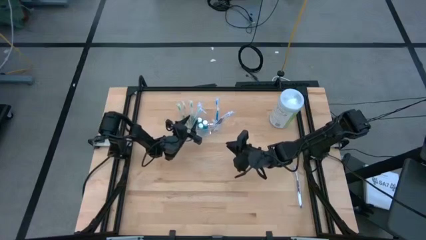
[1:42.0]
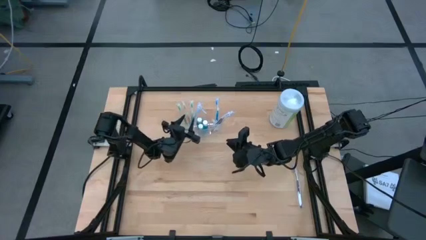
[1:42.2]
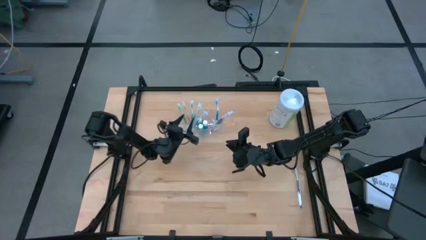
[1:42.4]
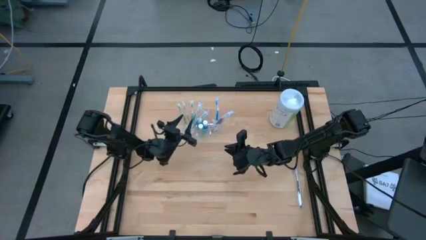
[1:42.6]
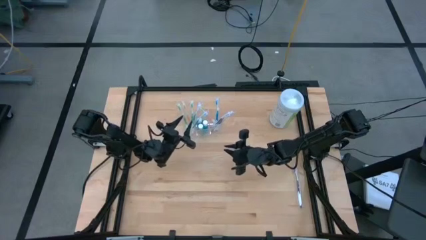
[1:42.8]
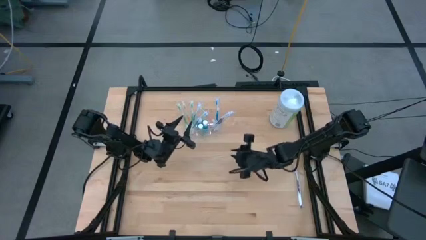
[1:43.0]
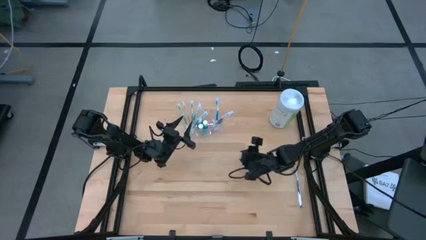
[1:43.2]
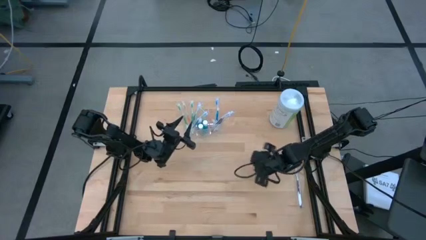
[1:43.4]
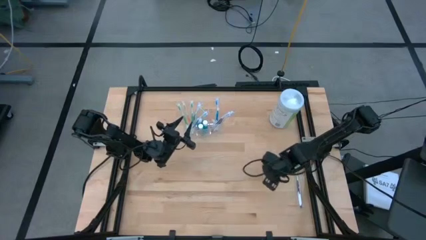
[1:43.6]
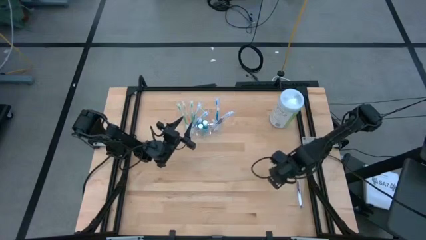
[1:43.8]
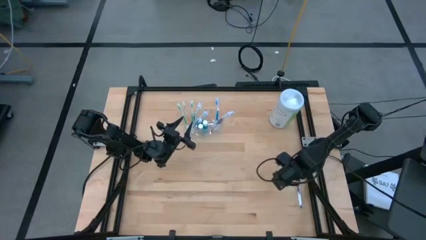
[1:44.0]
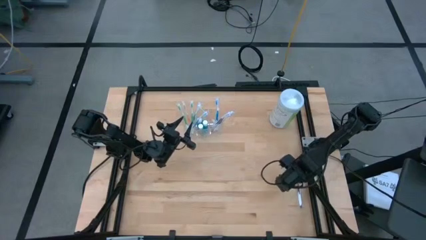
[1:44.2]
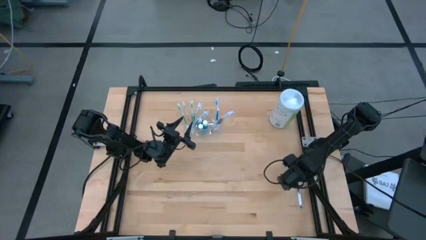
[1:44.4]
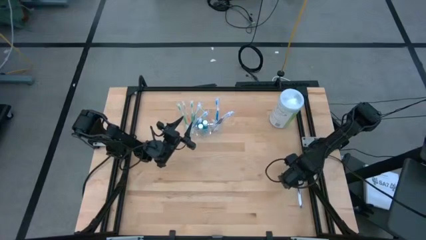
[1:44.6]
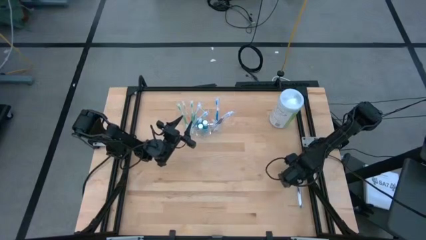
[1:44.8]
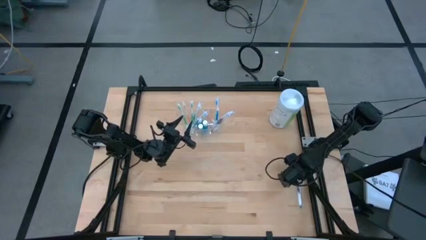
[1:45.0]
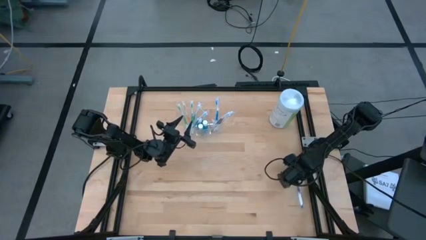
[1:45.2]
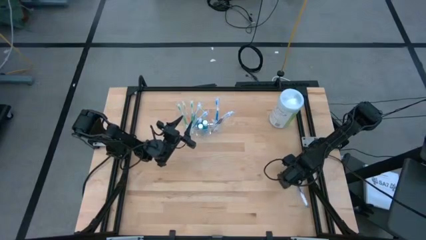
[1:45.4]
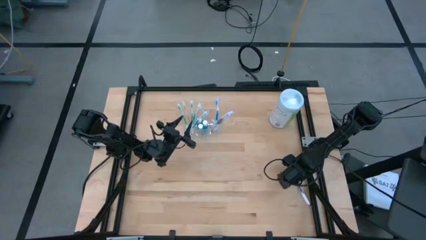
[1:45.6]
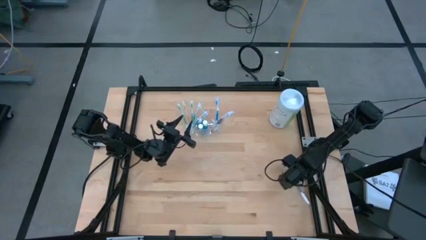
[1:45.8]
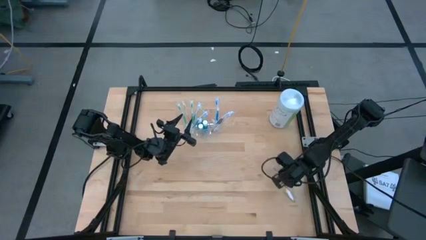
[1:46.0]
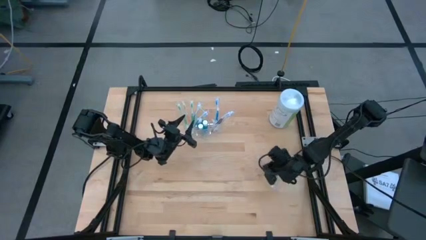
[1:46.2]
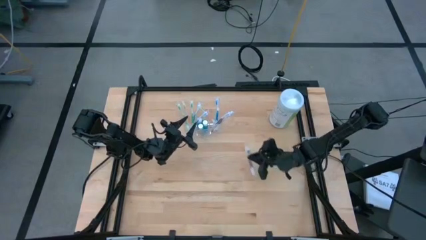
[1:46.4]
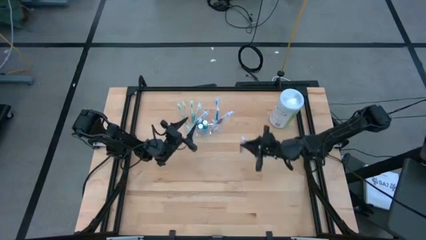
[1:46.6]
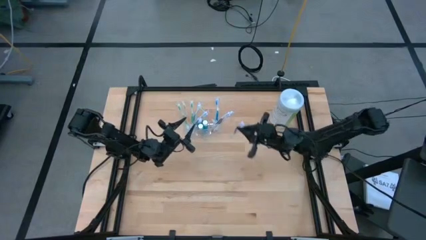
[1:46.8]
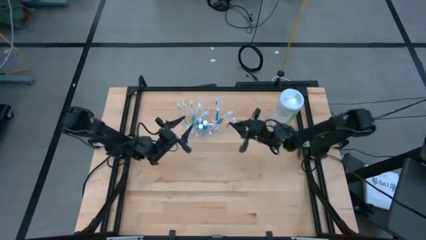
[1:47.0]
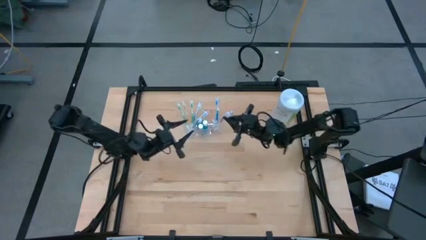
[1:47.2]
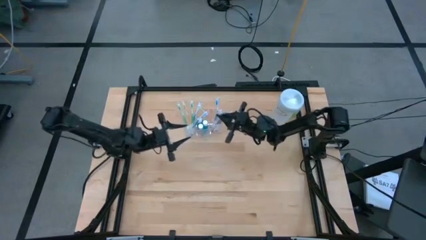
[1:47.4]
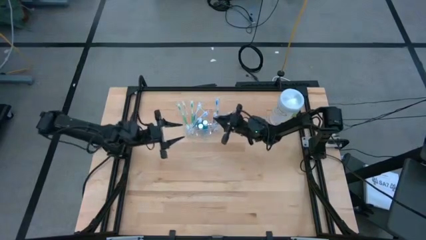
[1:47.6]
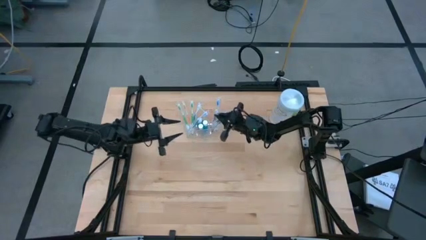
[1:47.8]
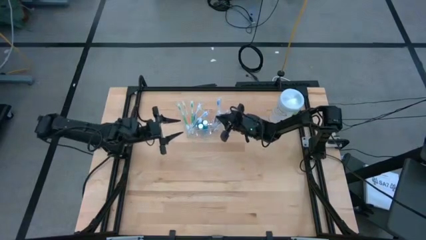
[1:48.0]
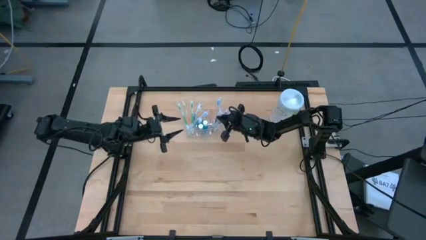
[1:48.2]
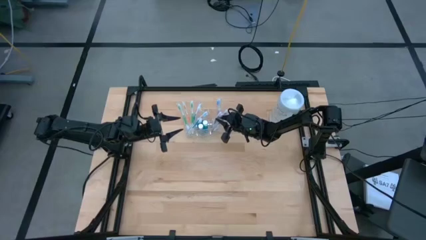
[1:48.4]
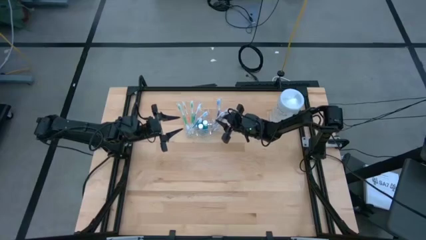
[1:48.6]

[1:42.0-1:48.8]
Task: Pick & Place toothbrushing station
Put the violet toothbrush into the transparent organizer

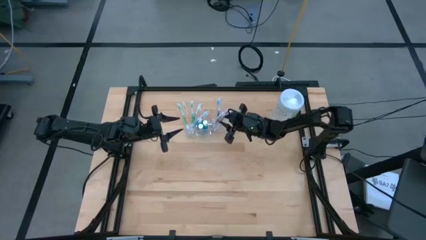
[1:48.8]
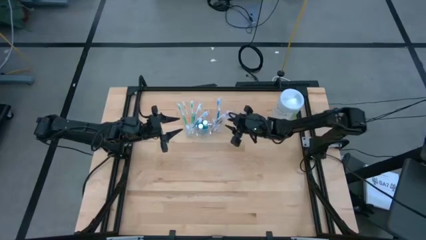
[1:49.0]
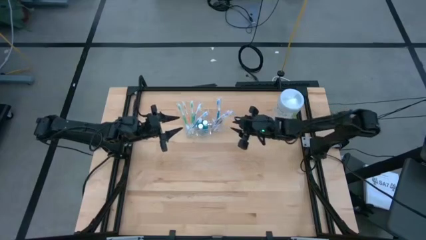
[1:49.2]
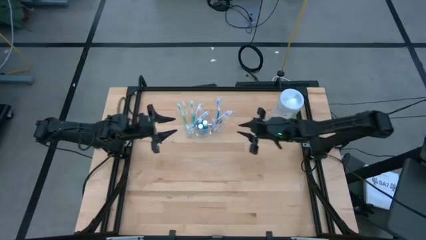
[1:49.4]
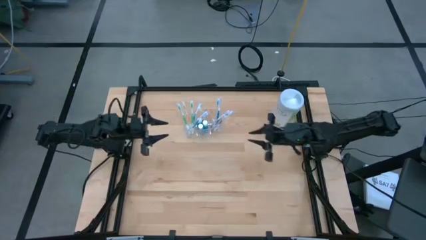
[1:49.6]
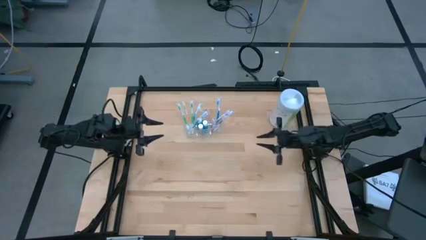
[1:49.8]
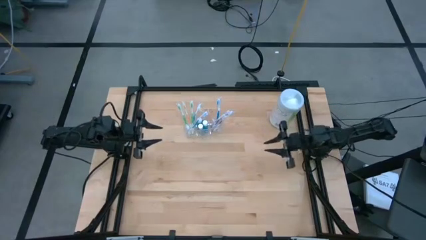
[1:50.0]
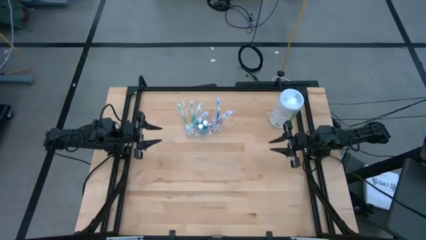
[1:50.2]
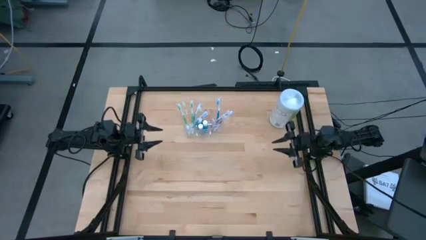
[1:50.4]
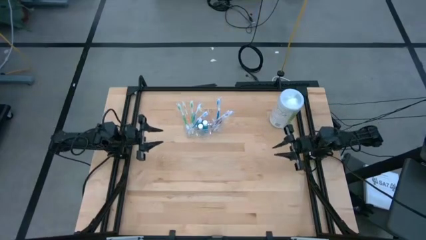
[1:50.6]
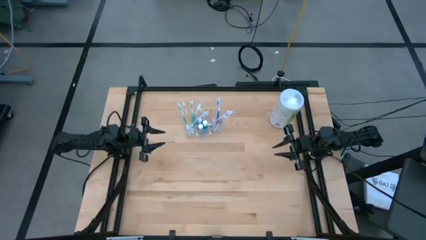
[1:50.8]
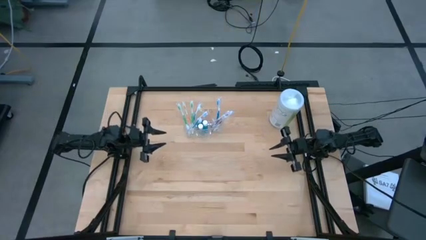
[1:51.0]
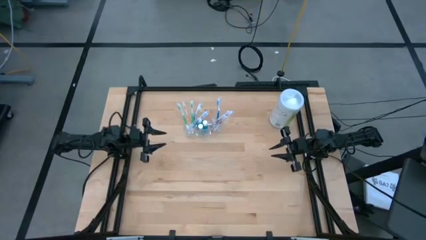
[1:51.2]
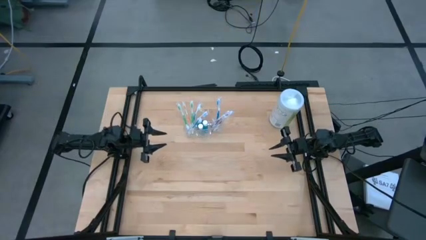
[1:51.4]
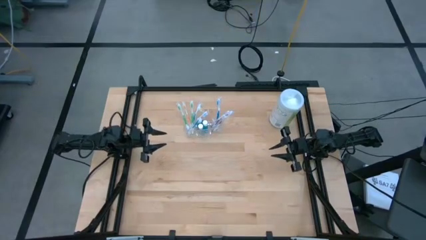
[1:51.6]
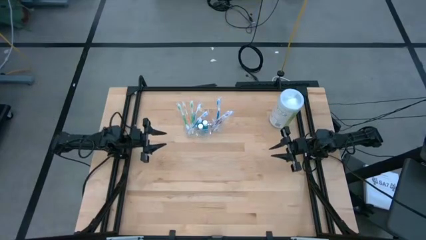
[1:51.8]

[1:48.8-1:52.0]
Return to home position
